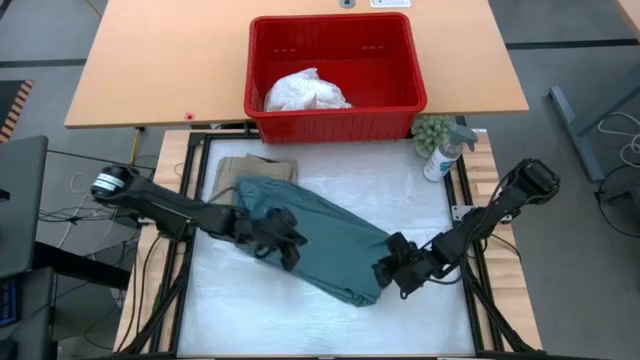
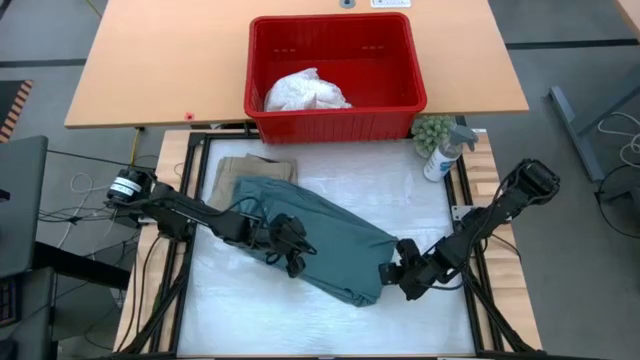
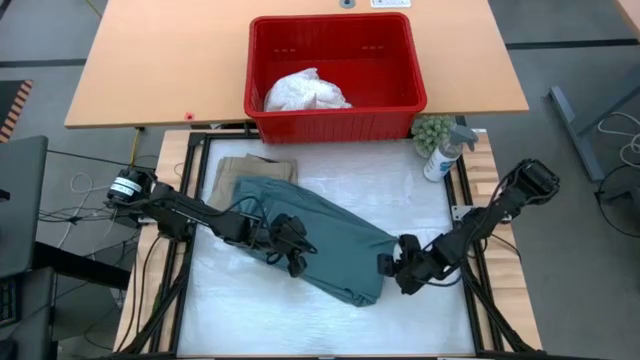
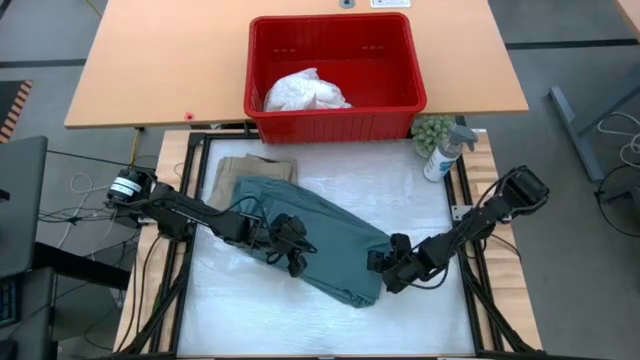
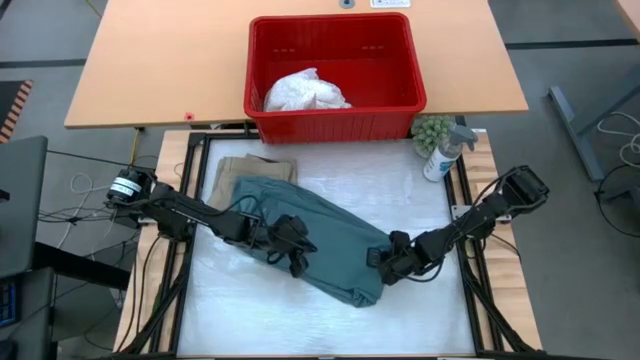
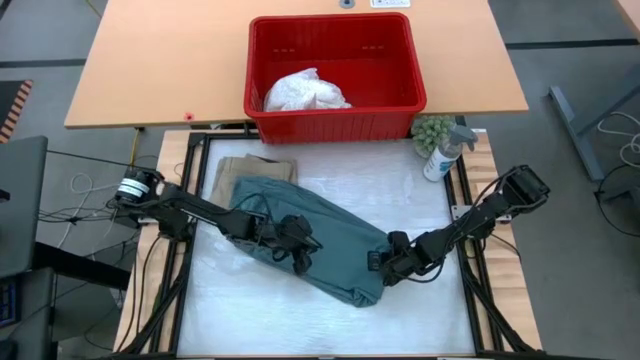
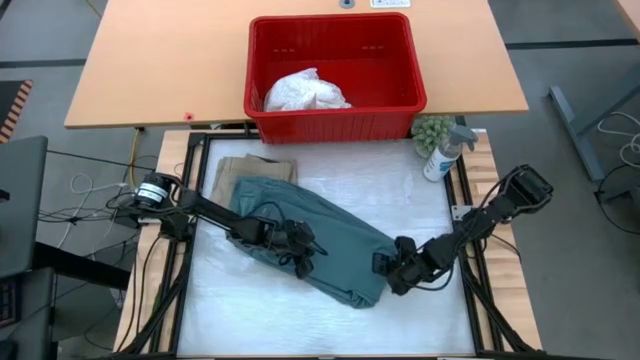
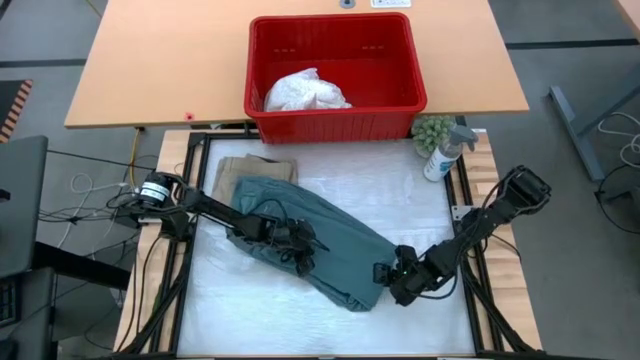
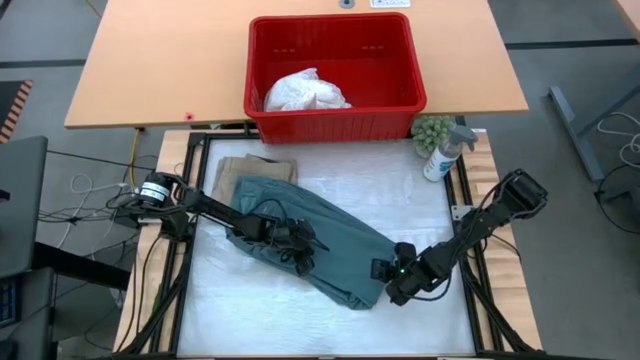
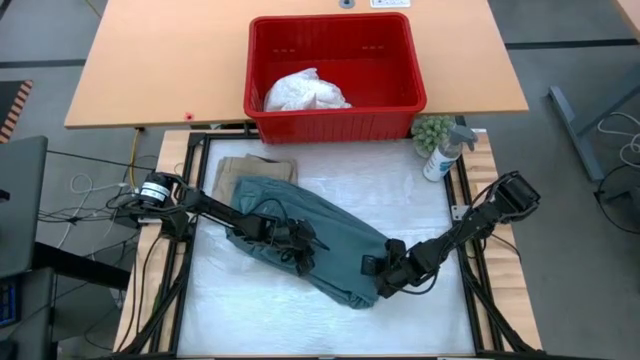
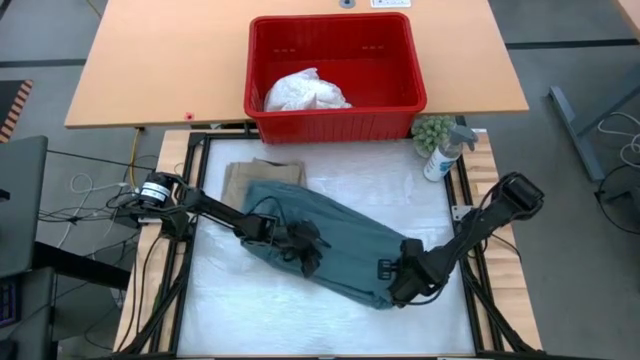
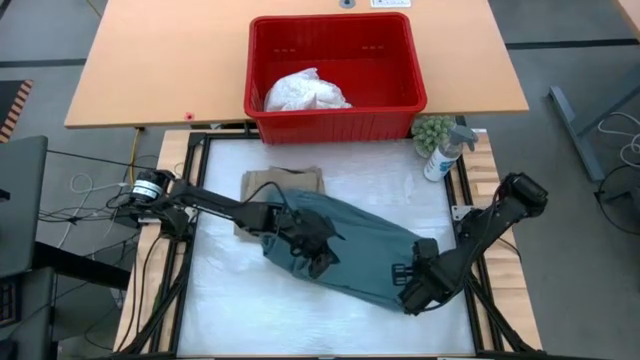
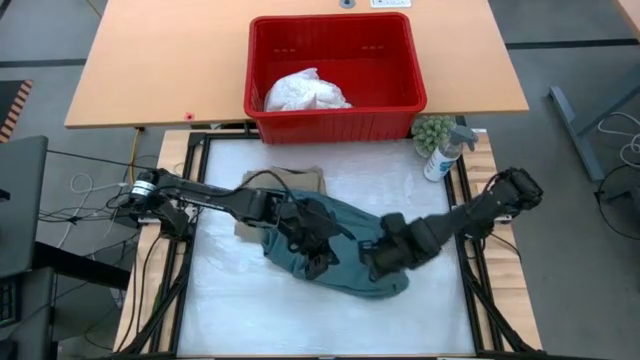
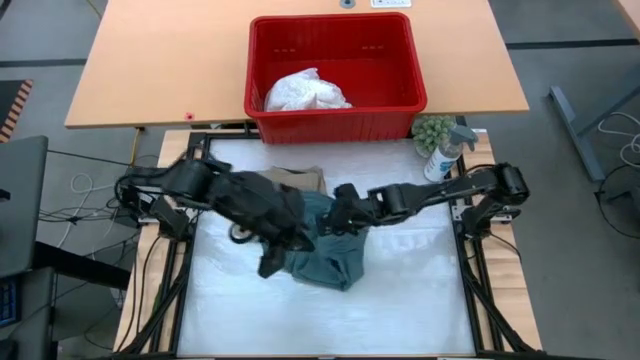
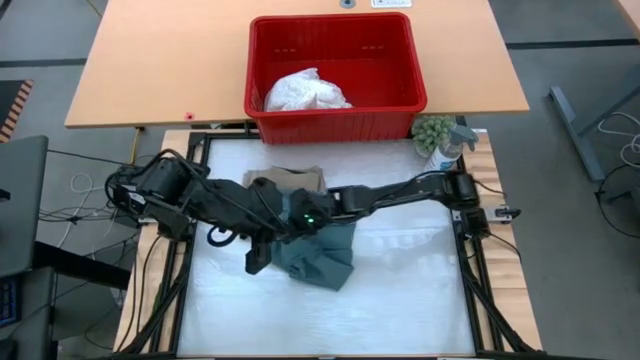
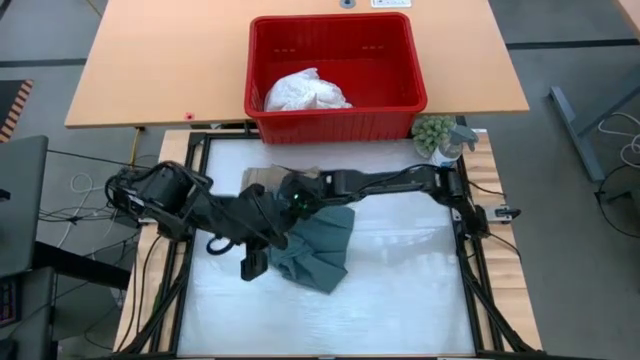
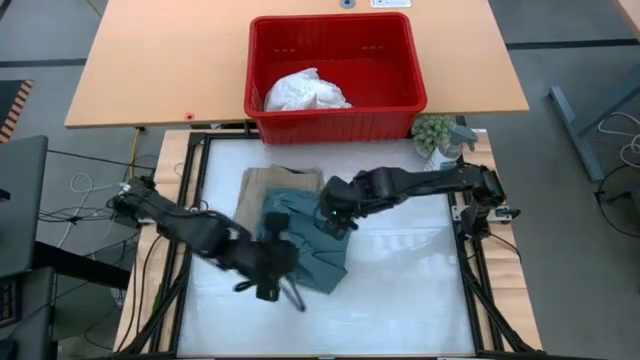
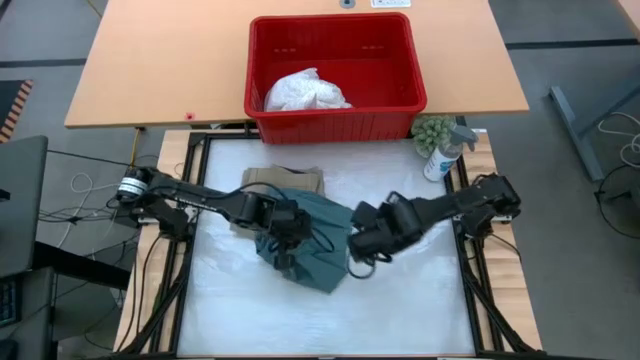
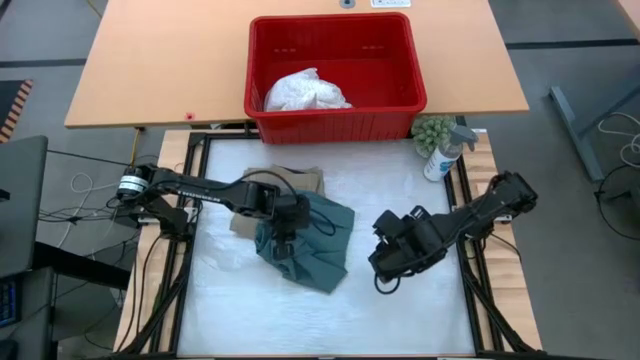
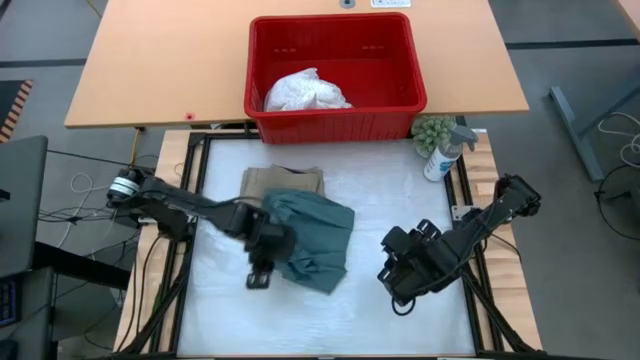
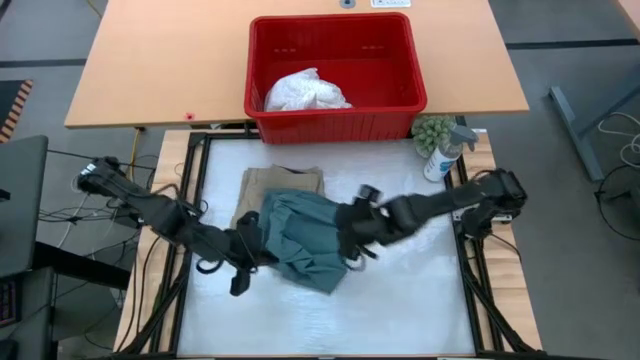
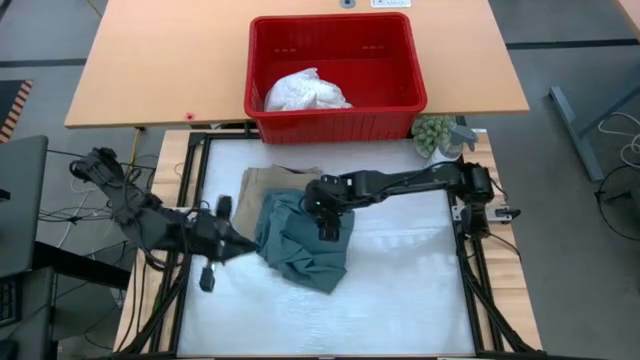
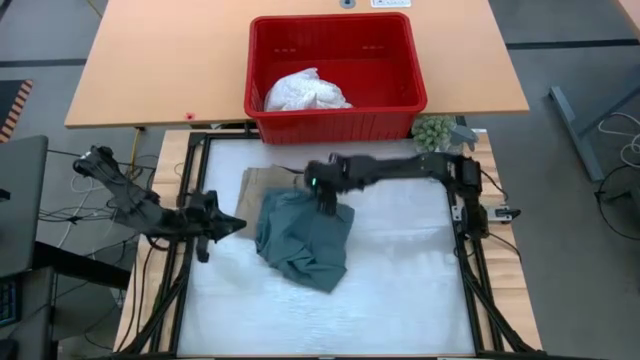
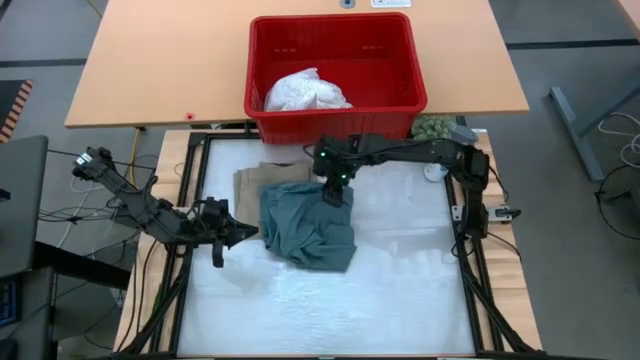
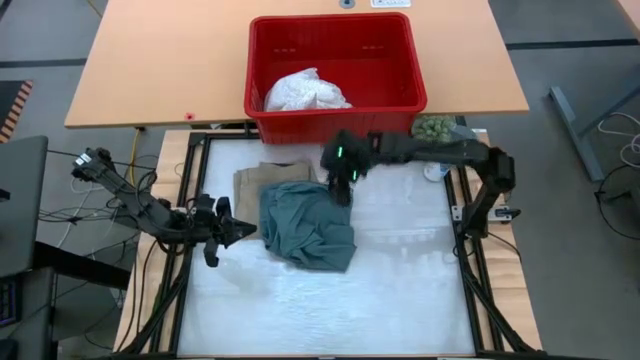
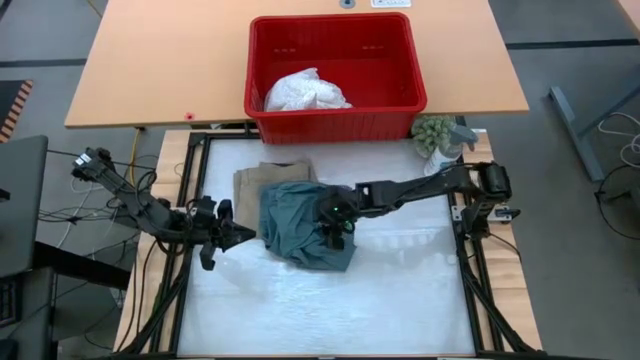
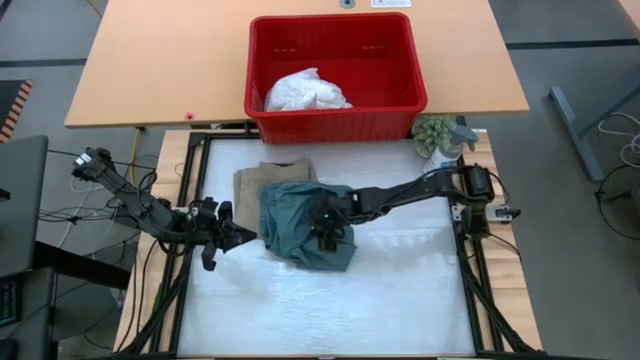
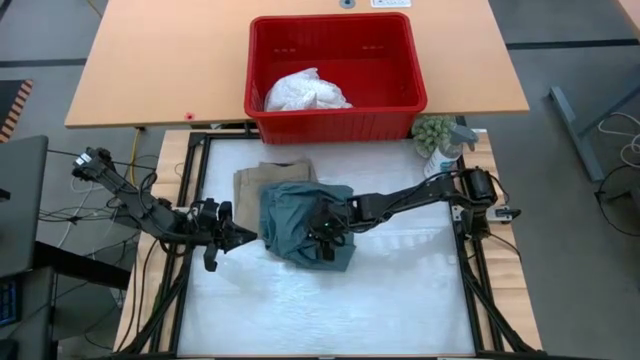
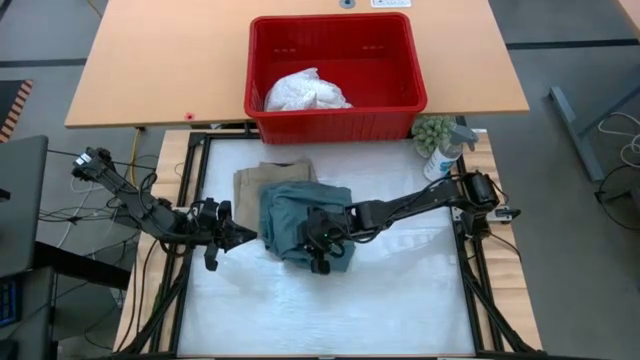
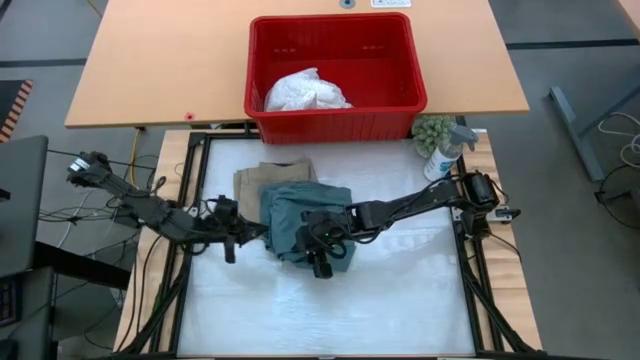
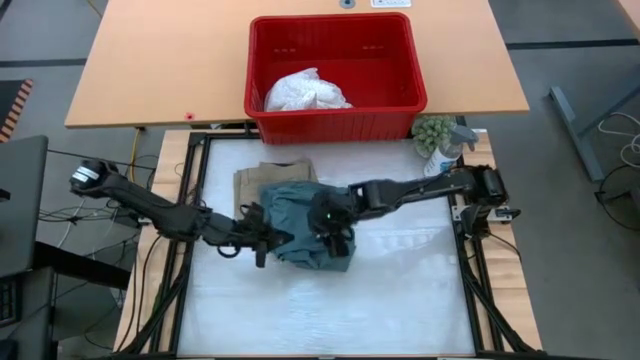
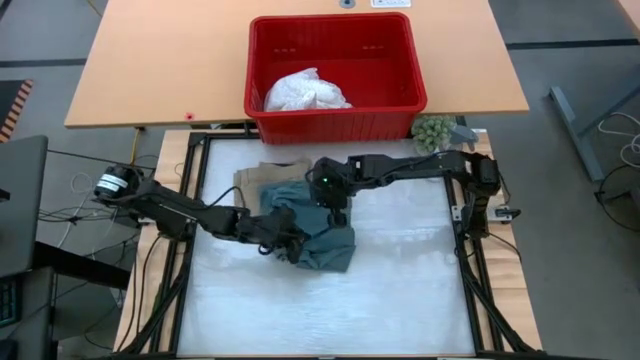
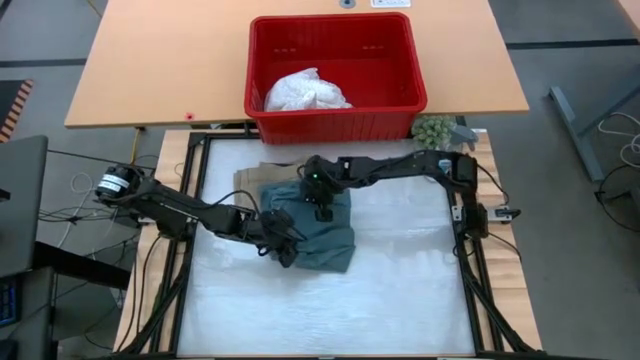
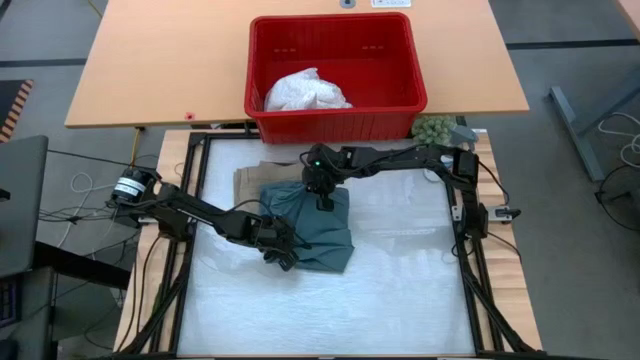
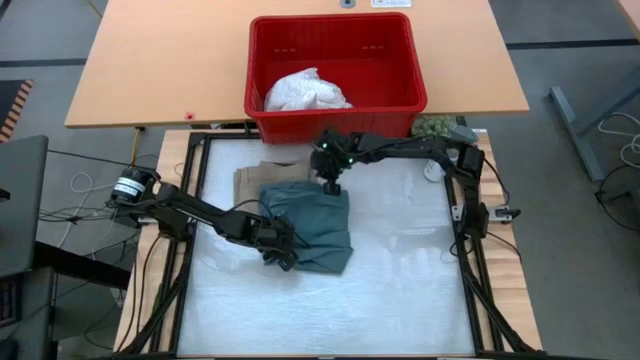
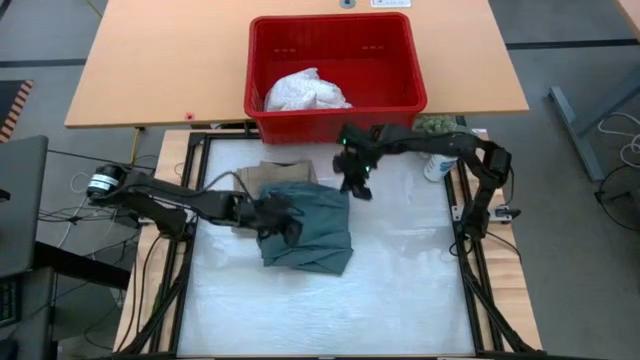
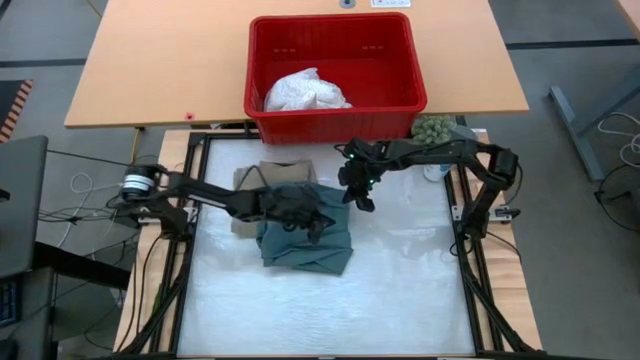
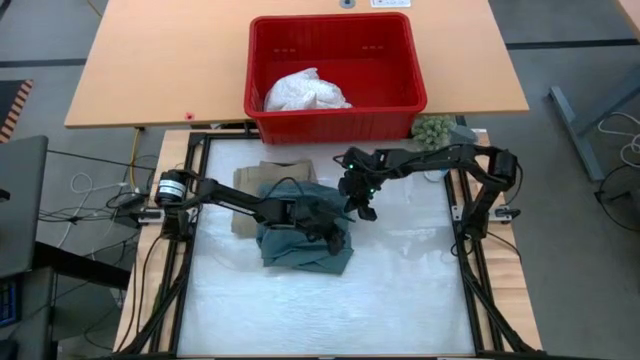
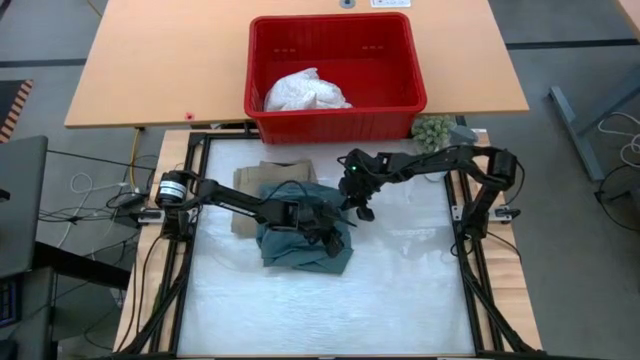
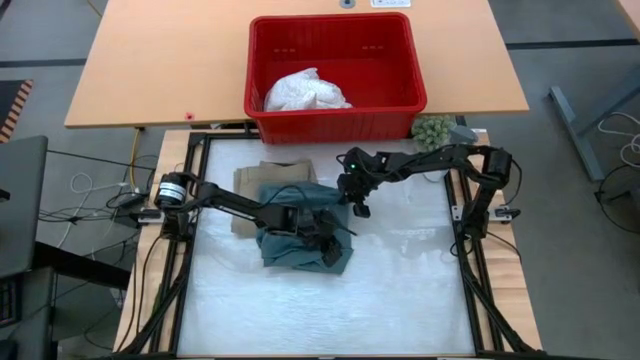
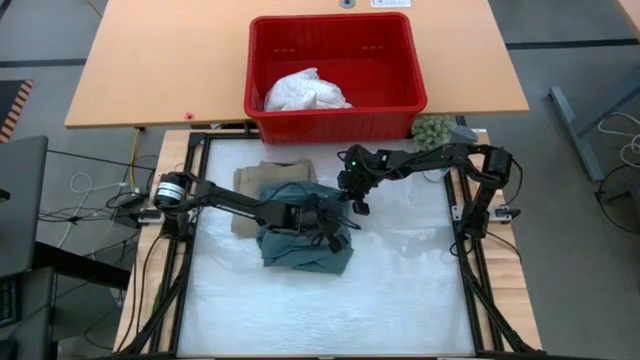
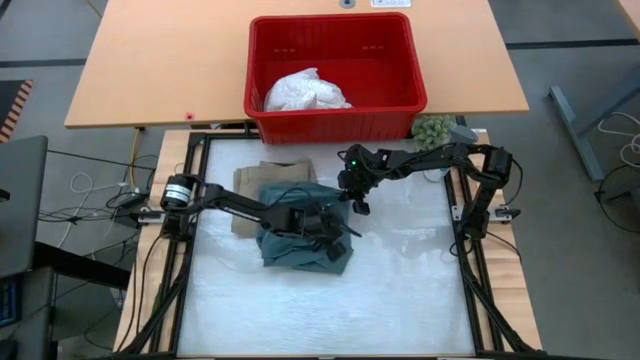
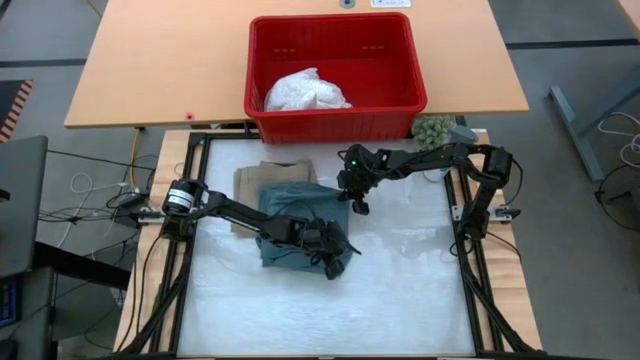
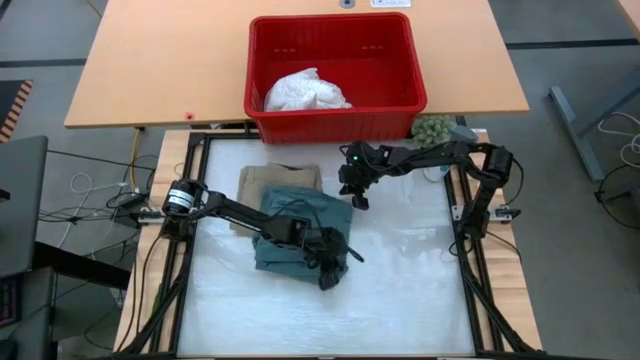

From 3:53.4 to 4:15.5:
Task: Fold Laundry from Bin
Fold the blue pants in the red bin
